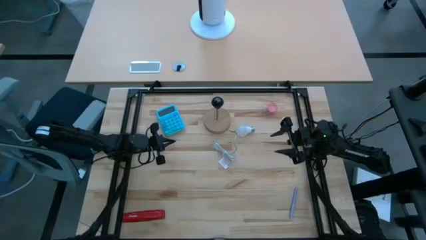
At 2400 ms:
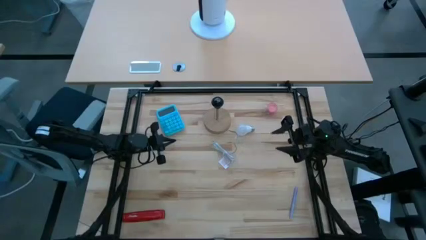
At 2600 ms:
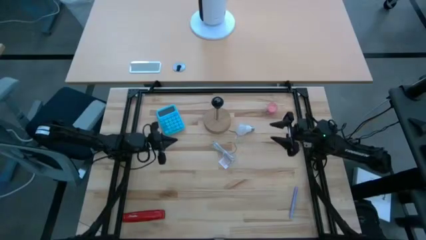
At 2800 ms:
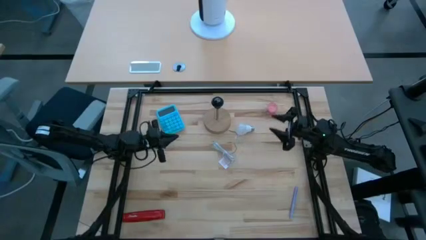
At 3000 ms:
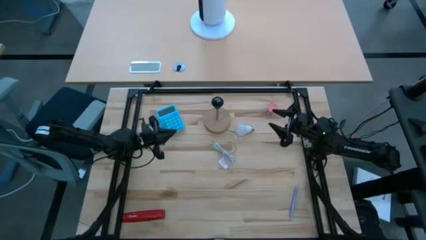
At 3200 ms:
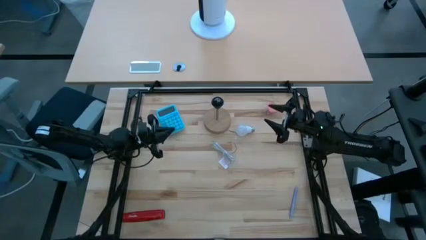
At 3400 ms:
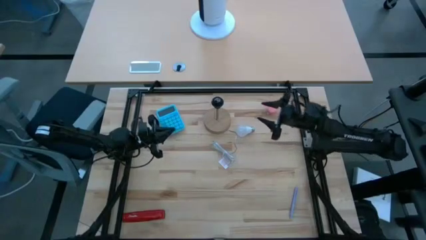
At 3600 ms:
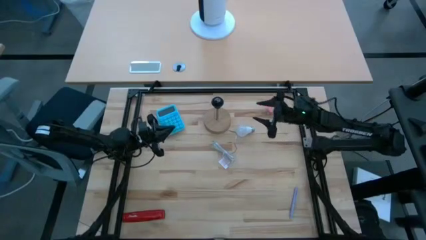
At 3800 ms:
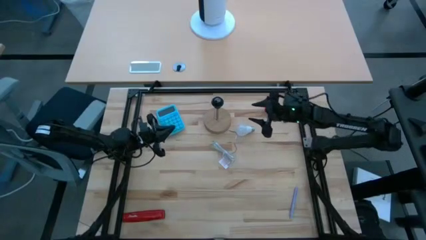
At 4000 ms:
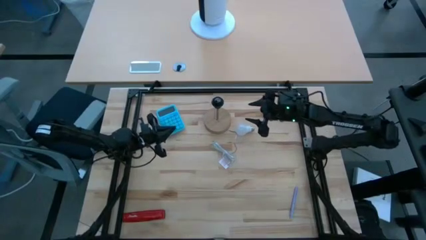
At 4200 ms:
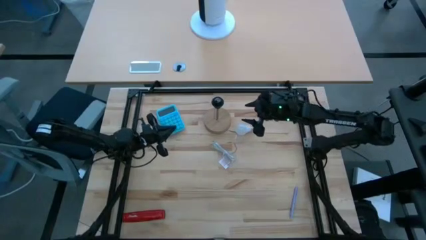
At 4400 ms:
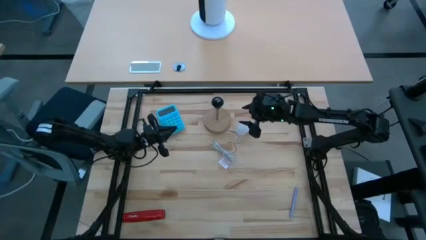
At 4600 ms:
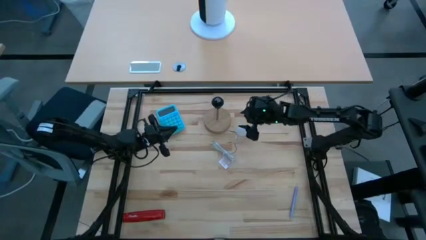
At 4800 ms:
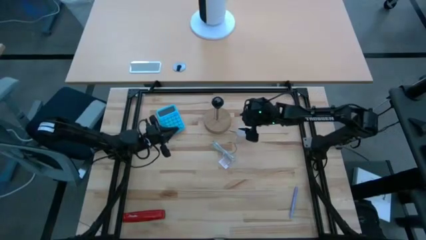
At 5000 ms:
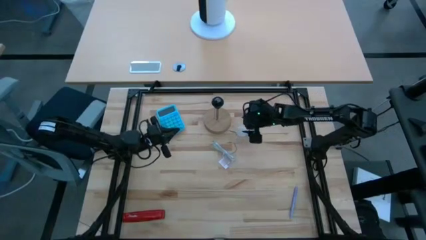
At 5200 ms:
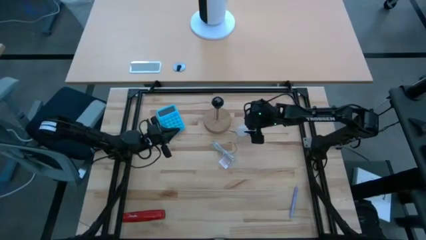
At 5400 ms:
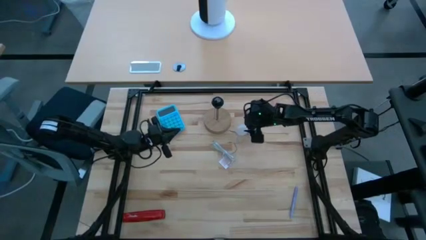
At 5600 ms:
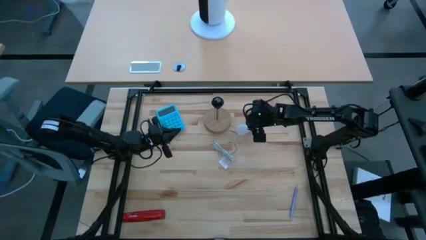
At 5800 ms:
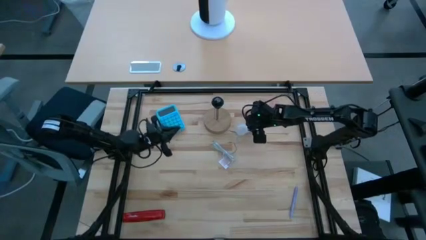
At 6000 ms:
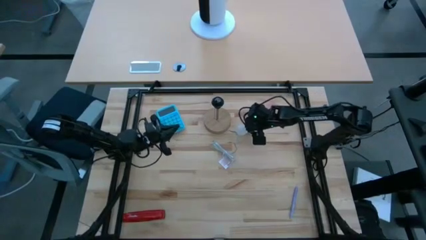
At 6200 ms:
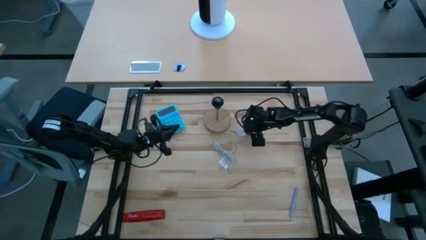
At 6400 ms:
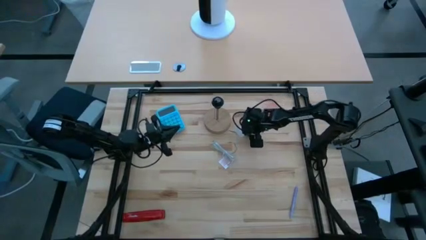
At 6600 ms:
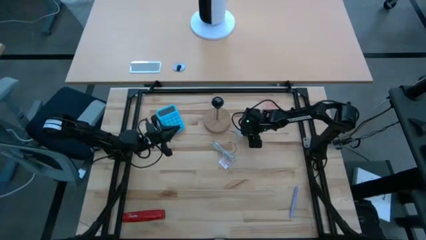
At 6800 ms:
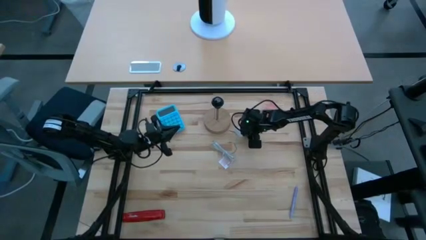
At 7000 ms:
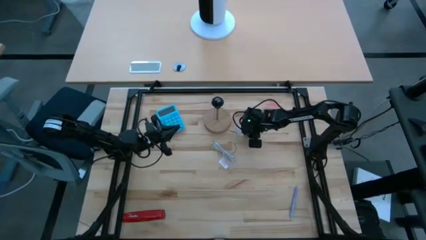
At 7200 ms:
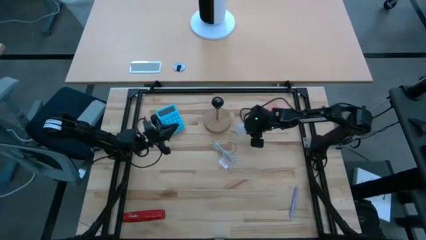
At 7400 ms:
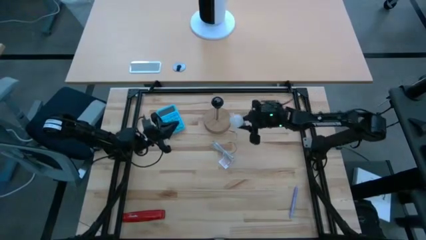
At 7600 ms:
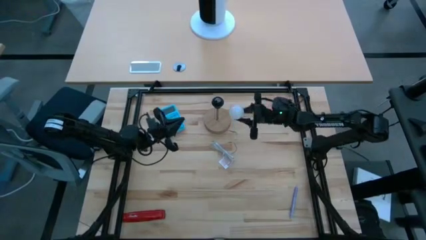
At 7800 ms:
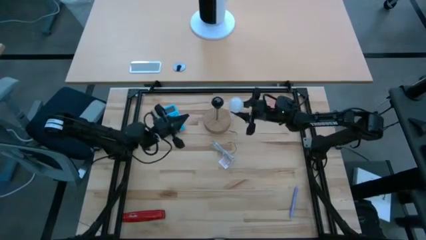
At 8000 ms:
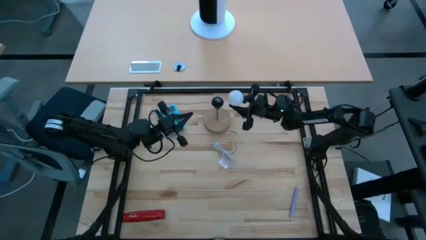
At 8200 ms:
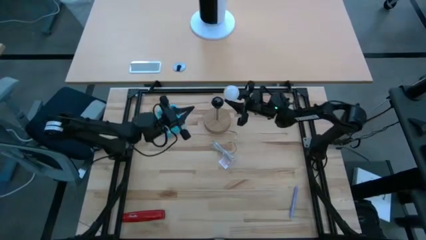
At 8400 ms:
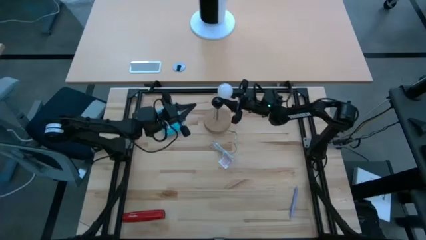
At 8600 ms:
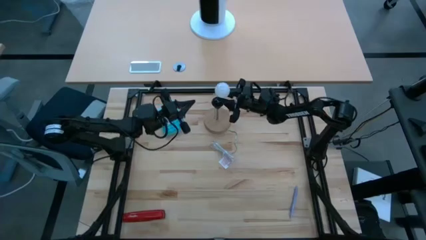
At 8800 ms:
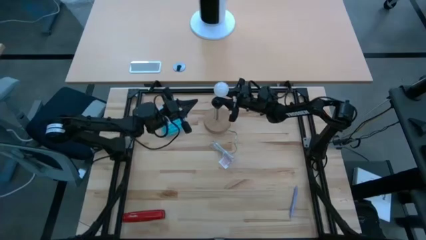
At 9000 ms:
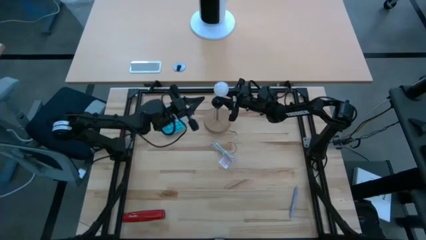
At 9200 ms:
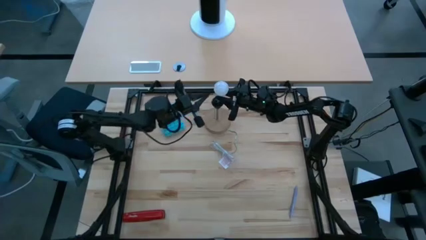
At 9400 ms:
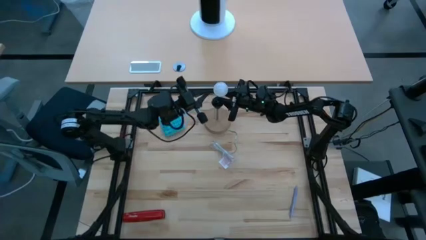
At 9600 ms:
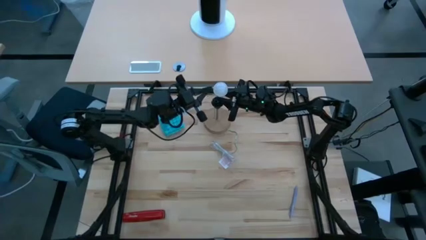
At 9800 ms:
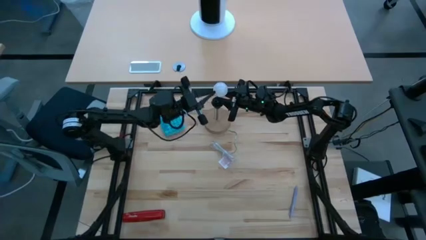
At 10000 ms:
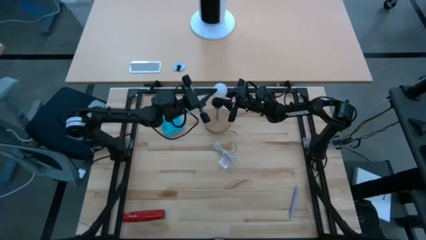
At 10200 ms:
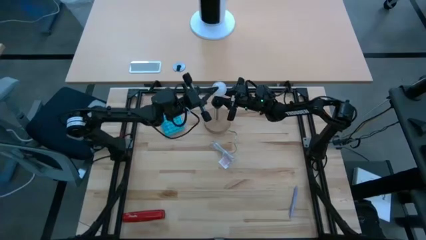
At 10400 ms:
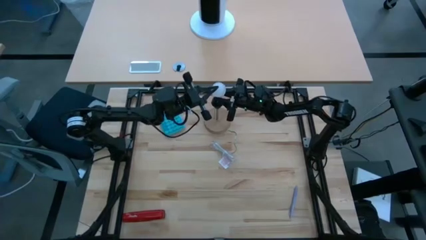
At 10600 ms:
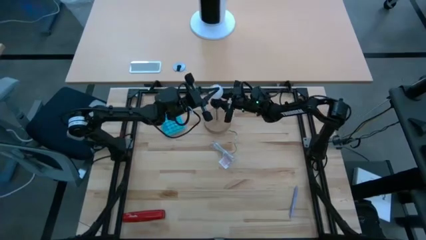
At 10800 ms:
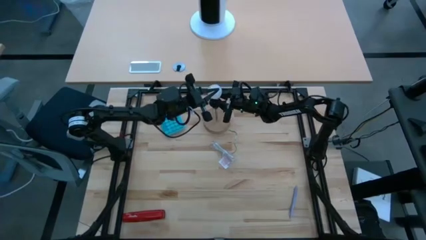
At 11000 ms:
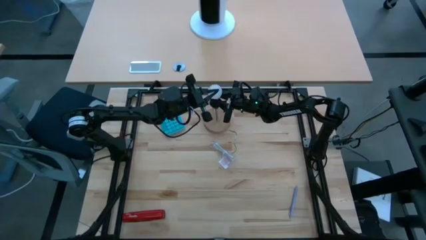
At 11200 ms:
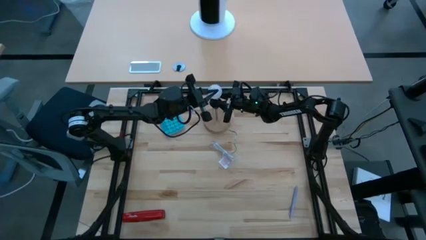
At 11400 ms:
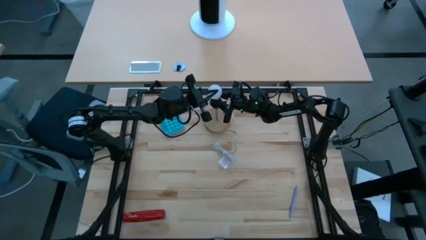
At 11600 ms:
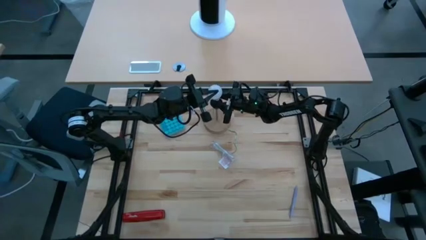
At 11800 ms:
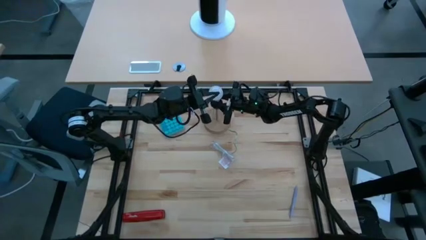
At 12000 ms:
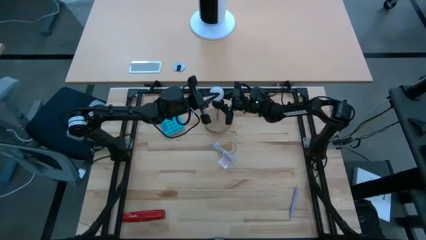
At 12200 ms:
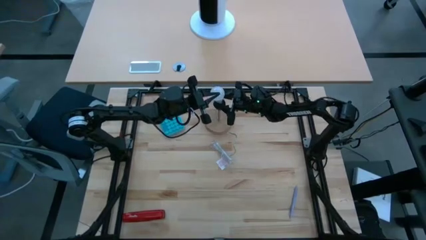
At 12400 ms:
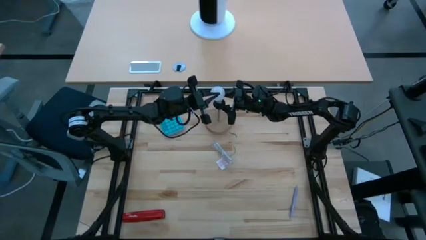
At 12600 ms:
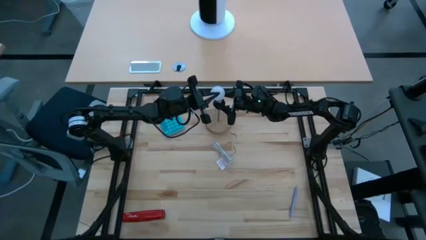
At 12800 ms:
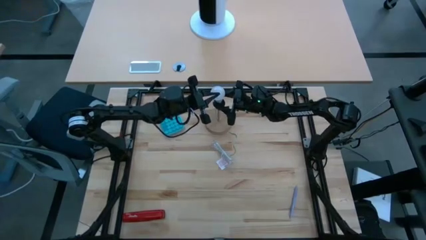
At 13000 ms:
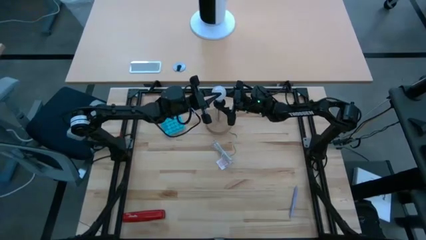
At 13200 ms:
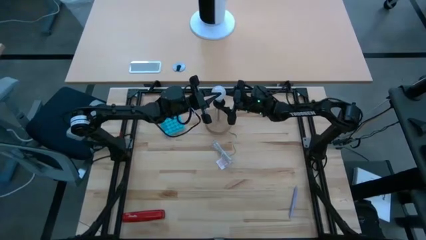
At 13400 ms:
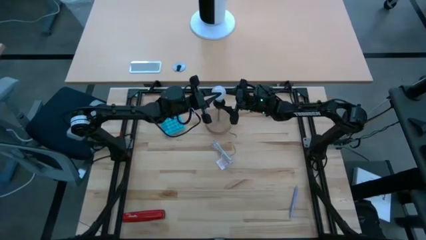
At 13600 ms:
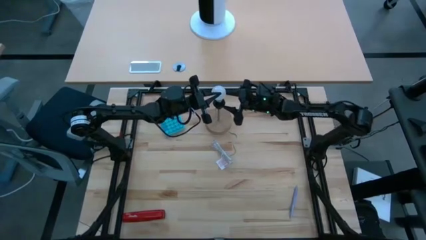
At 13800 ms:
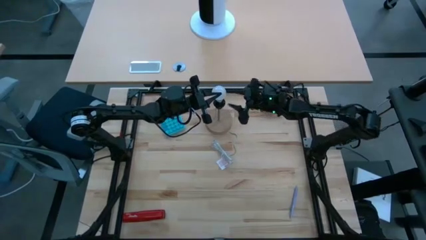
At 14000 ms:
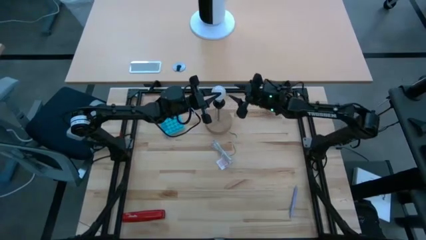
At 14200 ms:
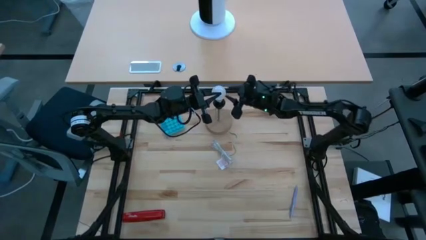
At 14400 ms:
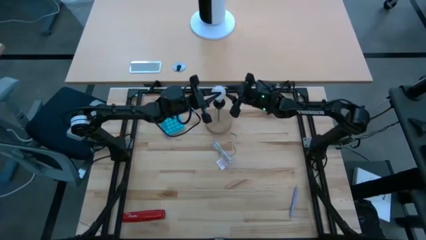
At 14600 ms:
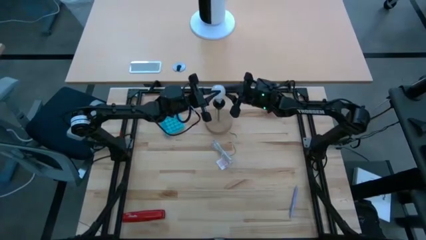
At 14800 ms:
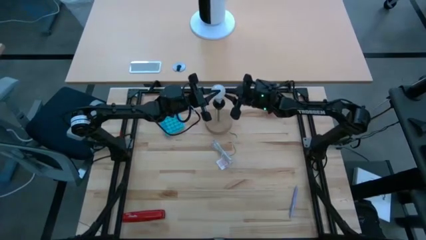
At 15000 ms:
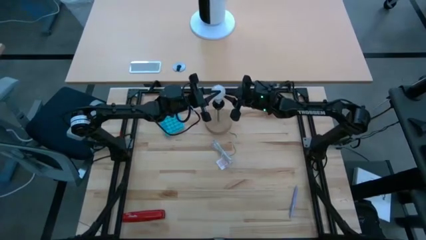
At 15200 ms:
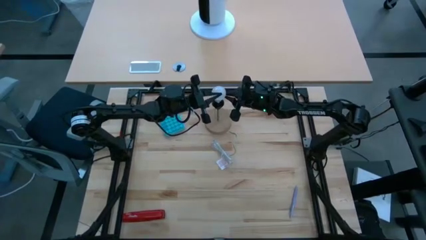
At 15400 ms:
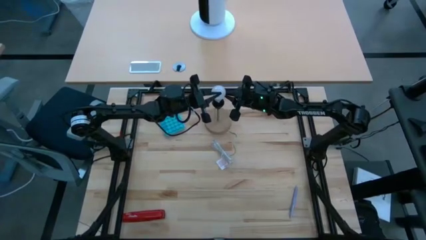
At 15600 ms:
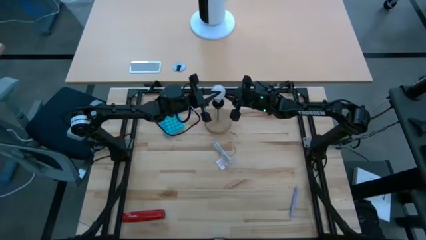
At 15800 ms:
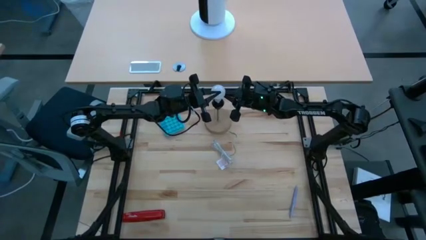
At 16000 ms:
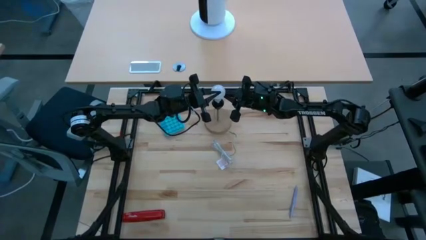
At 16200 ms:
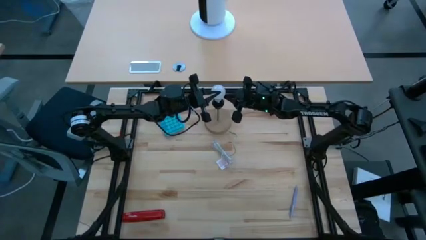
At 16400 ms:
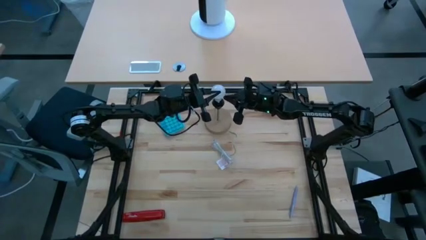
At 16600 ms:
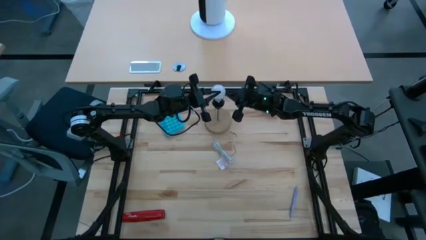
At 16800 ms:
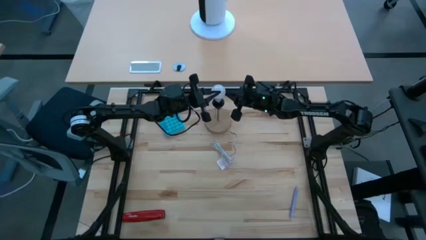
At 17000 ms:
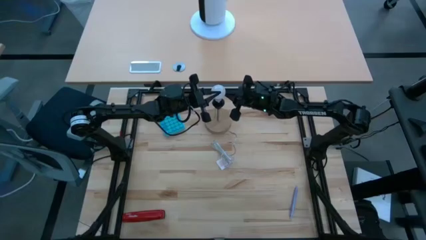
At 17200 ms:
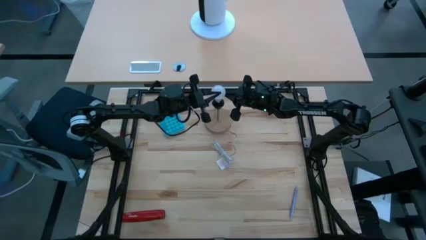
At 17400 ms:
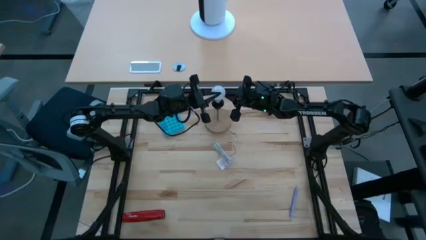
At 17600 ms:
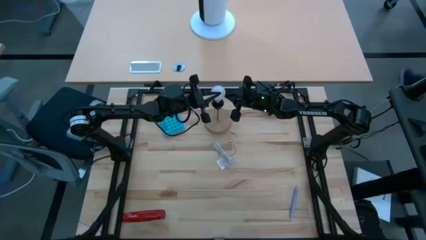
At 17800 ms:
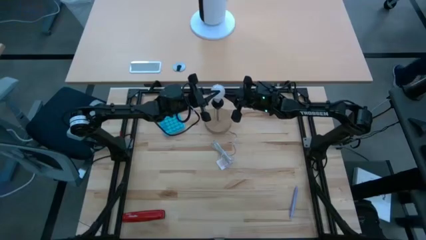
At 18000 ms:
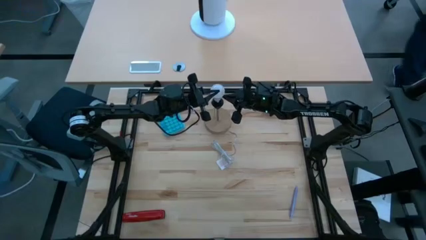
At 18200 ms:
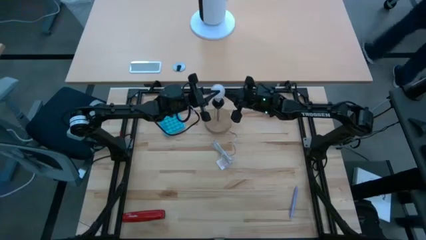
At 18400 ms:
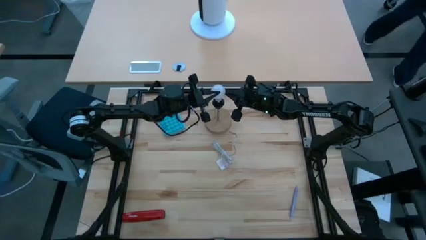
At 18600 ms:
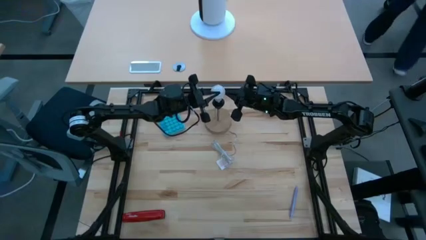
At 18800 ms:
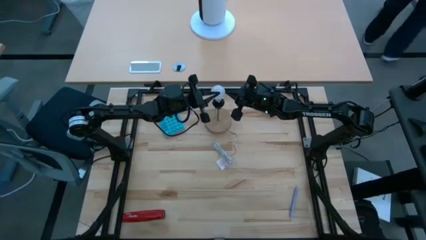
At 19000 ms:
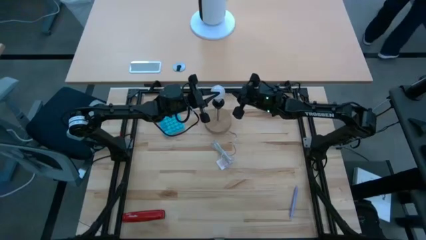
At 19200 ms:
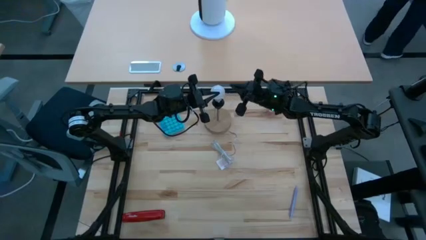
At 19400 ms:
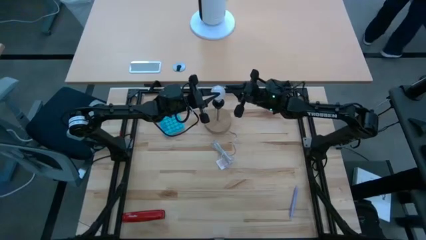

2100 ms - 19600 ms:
Task: Screw lightbulb
Insert the light bulb into the desk lamp
